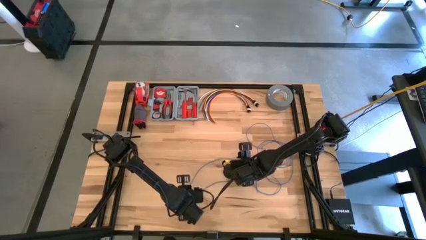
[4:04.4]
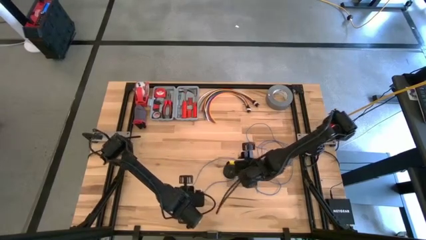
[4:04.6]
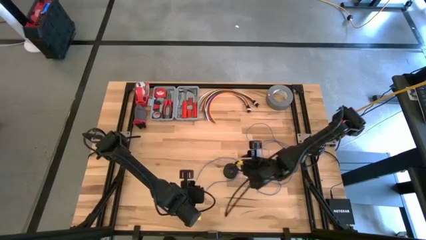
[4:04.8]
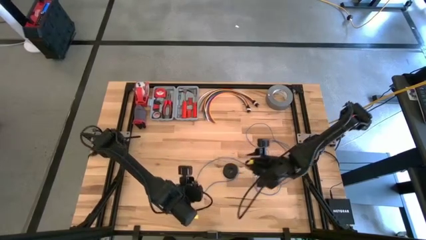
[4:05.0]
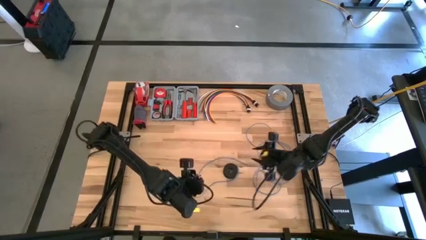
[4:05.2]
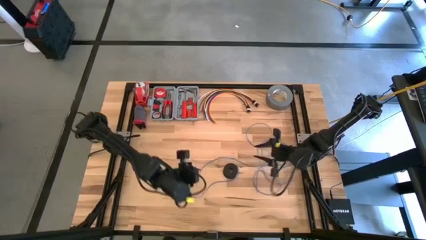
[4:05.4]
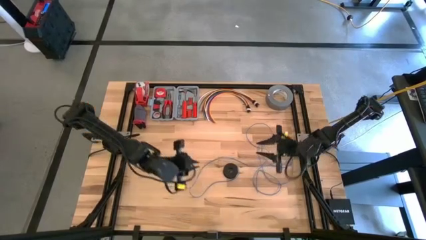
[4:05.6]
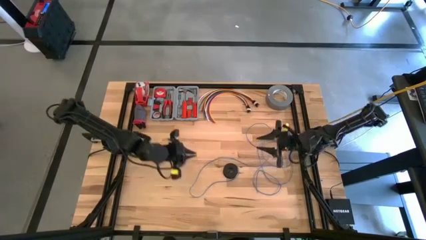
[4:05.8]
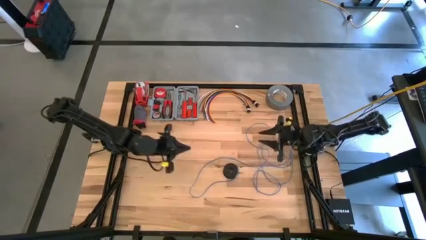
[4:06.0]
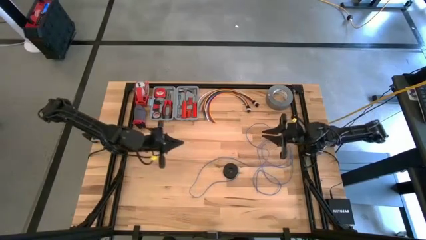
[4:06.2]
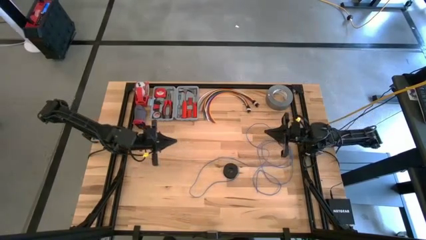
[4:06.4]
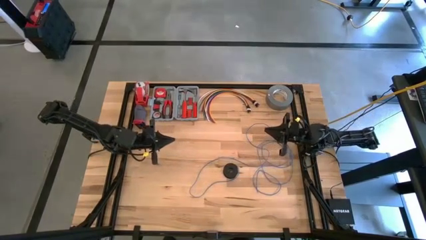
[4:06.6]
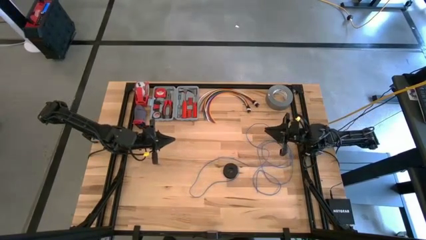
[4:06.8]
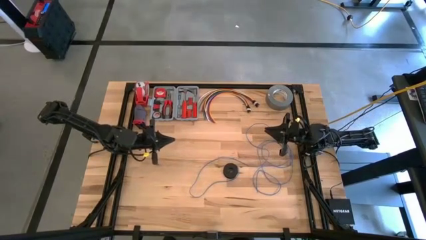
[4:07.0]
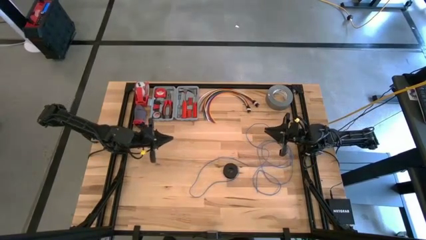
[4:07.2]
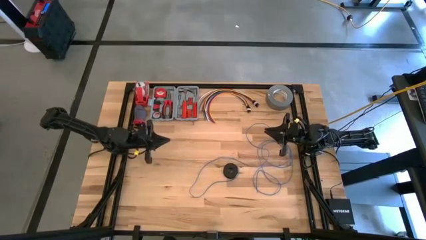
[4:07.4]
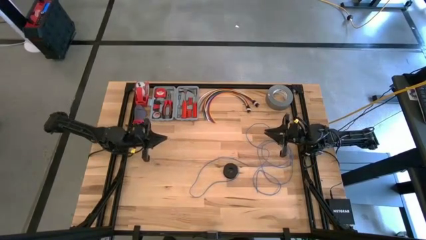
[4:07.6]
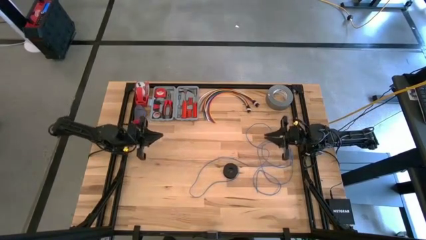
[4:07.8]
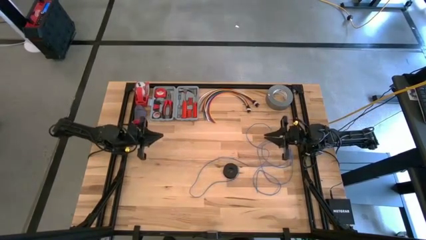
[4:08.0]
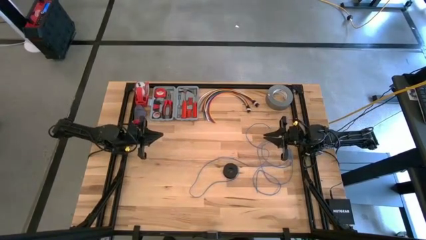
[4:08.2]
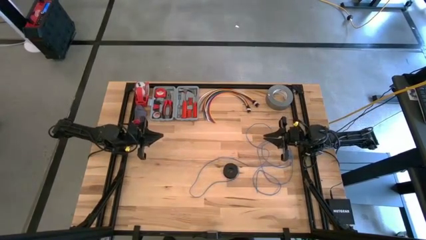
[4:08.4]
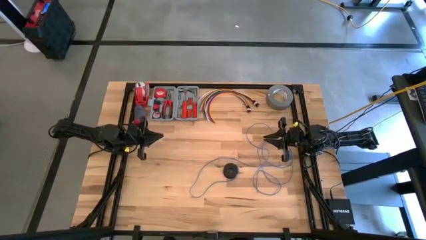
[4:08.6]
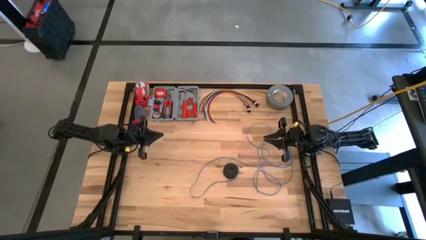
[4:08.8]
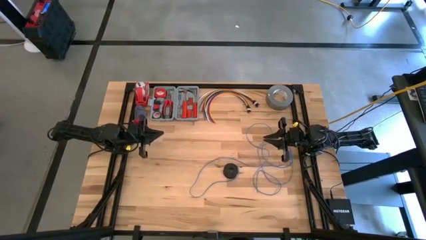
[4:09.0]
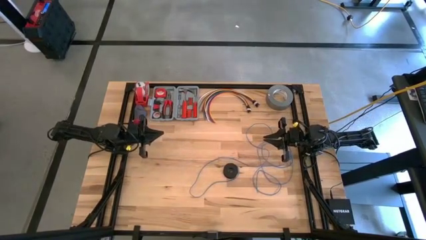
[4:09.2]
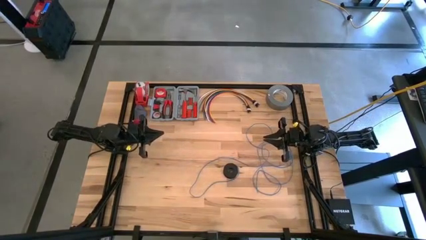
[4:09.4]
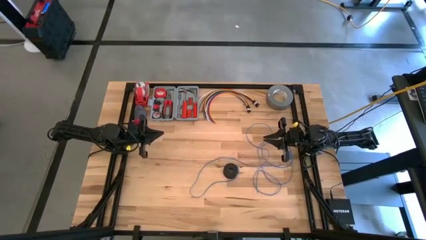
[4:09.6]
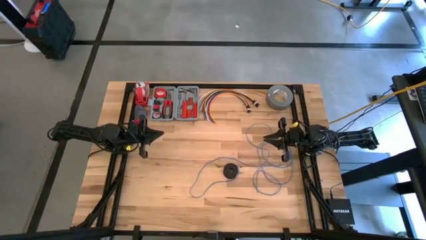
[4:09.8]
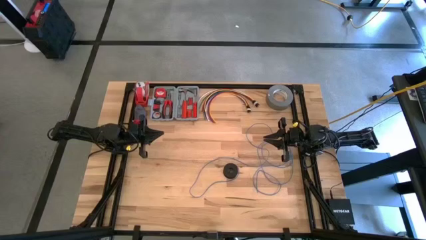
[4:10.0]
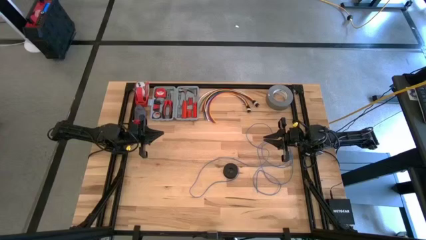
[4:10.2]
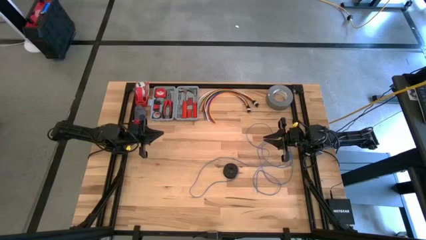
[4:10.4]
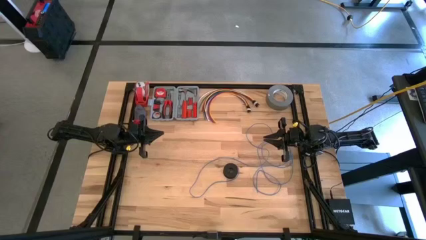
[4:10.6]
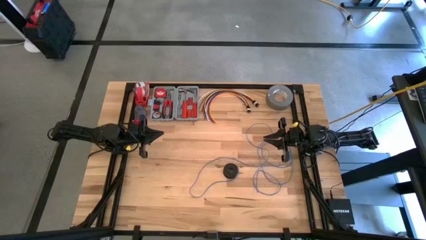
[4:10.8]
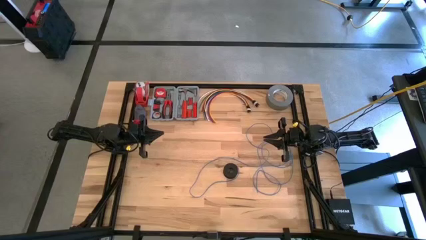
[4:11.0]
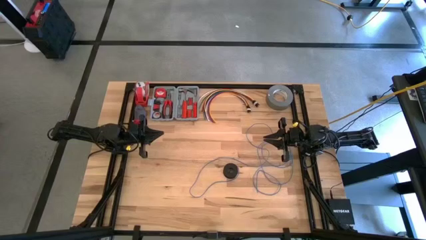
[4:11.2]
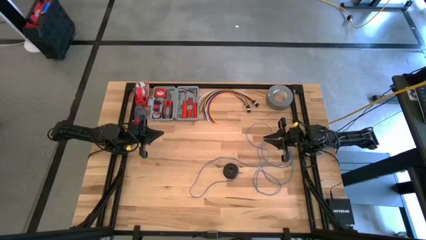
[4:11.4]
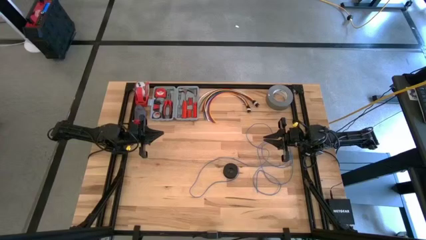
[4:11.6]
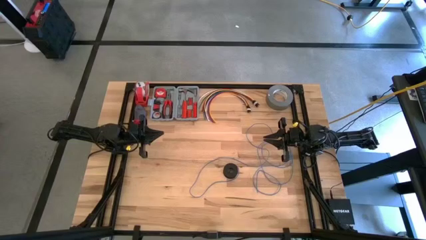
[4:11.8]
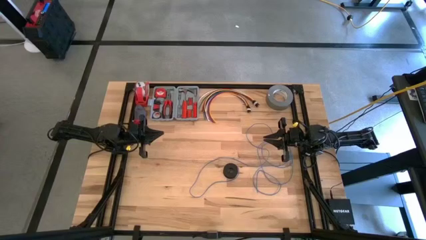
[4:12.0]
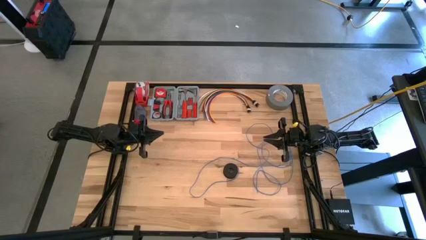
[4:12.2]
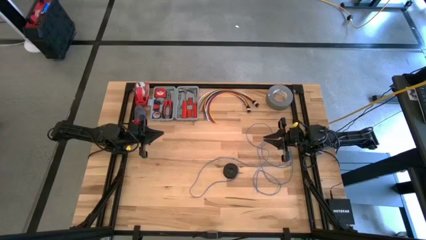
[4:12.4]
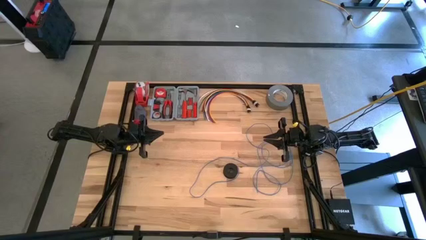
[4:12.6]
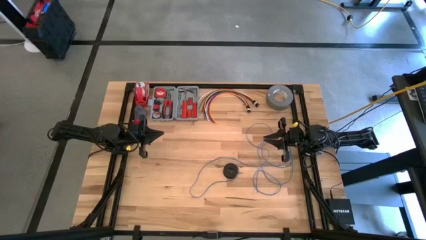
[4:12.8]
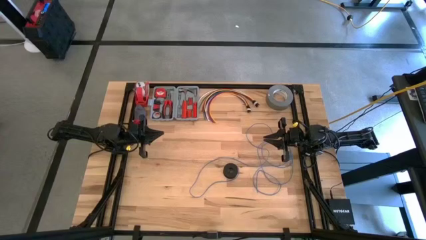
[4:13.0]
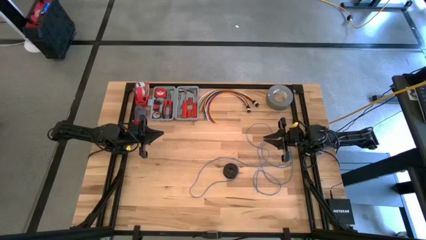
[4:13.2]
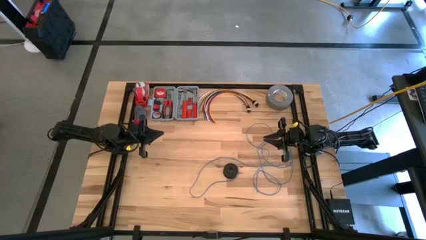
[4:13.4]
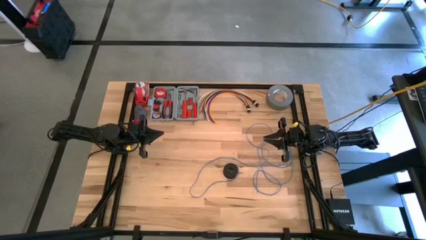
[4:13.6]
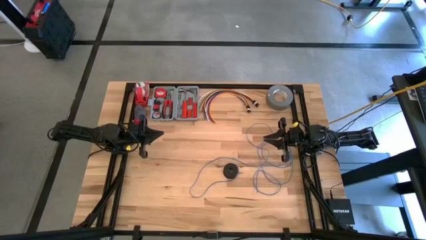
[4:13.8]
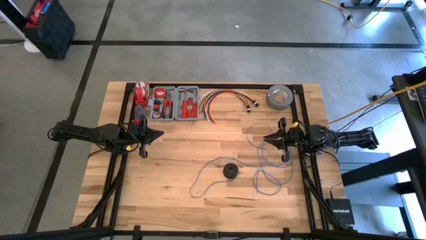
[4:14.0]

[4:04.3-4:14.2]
Task: Coil cords
Return to Home Position

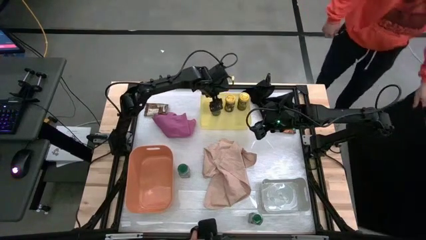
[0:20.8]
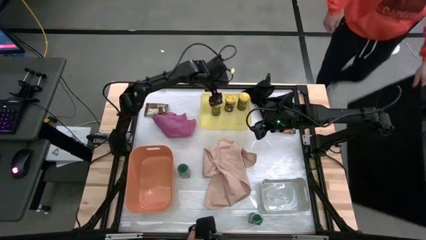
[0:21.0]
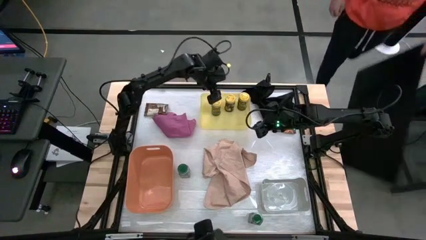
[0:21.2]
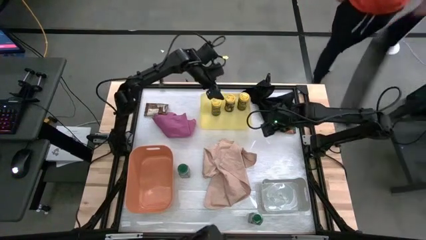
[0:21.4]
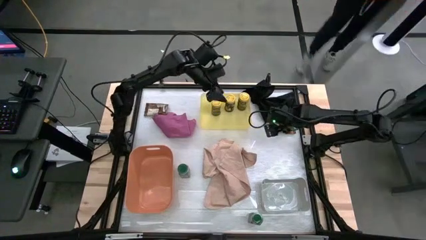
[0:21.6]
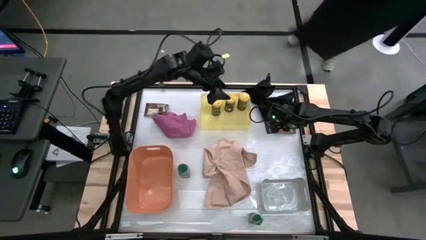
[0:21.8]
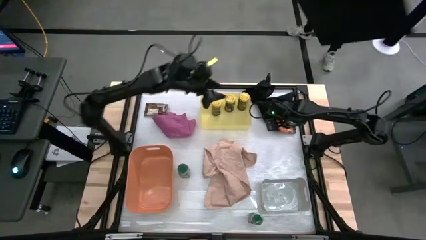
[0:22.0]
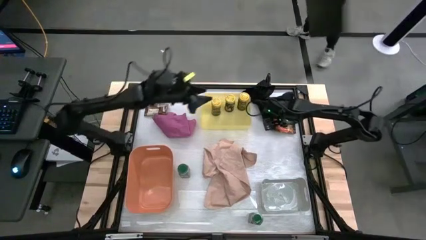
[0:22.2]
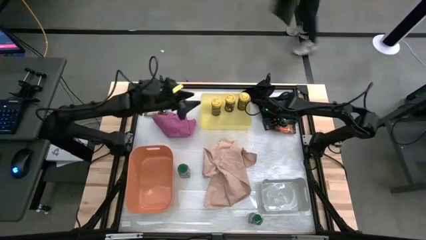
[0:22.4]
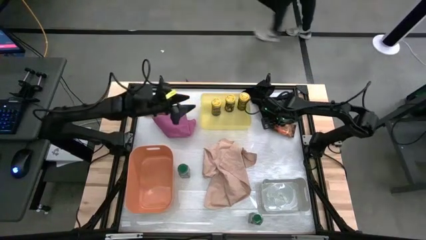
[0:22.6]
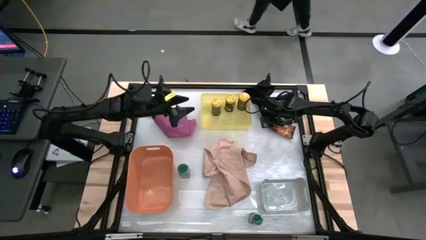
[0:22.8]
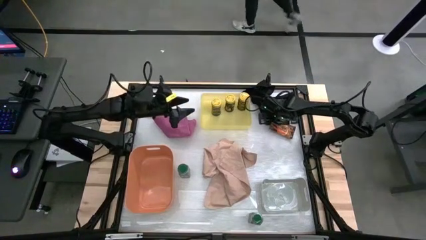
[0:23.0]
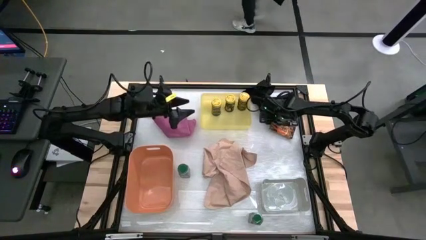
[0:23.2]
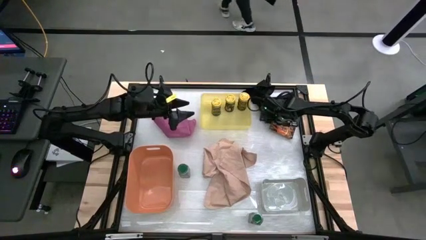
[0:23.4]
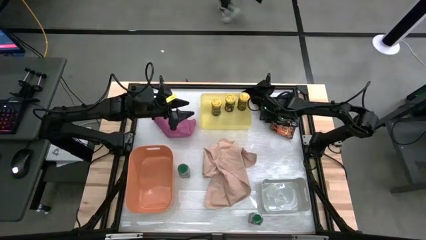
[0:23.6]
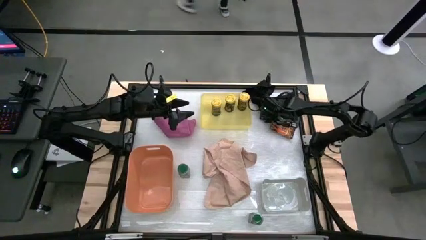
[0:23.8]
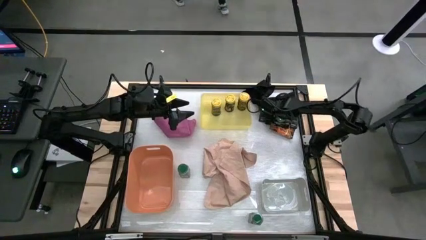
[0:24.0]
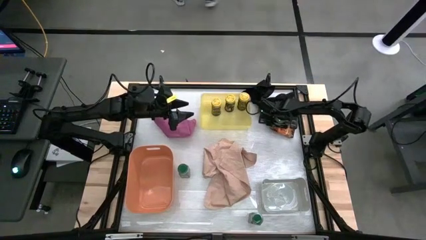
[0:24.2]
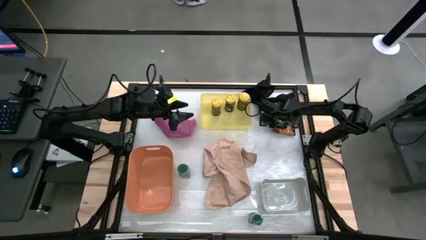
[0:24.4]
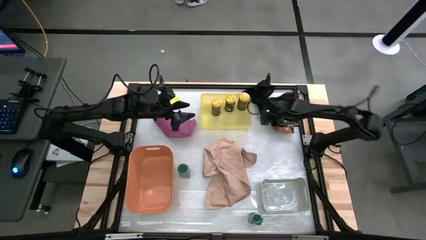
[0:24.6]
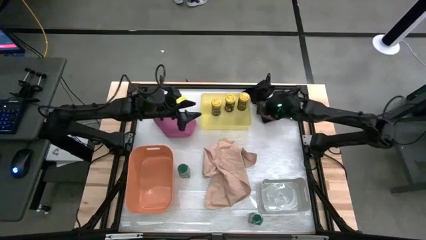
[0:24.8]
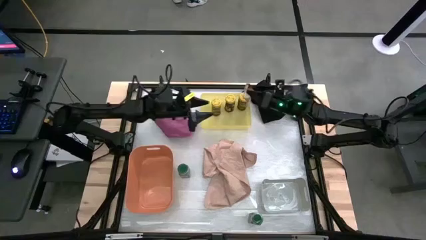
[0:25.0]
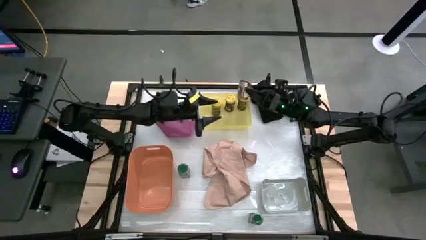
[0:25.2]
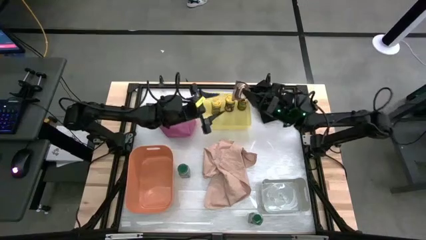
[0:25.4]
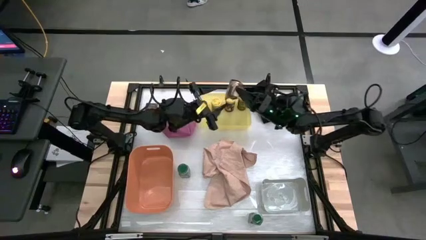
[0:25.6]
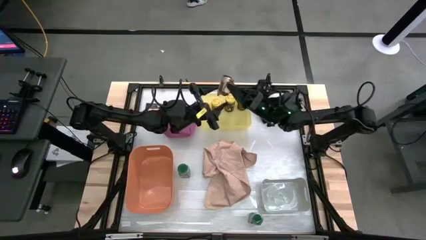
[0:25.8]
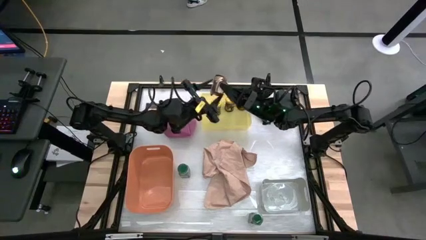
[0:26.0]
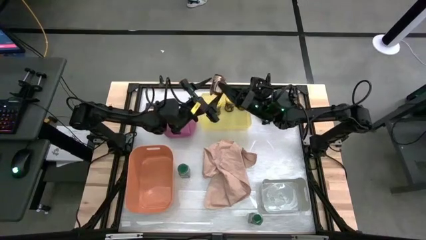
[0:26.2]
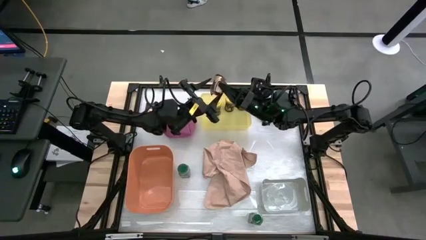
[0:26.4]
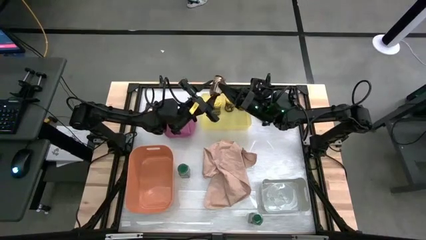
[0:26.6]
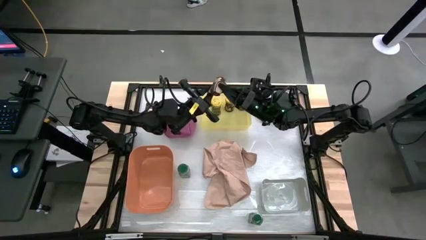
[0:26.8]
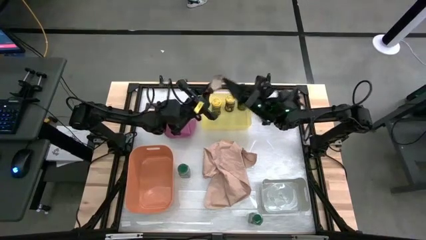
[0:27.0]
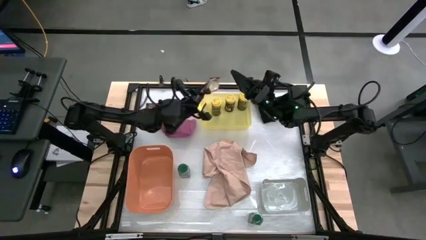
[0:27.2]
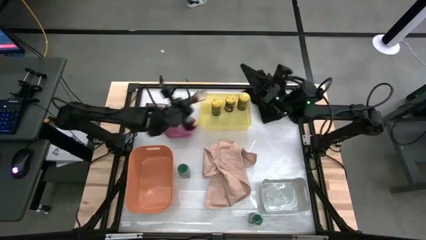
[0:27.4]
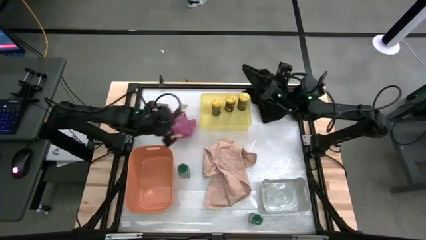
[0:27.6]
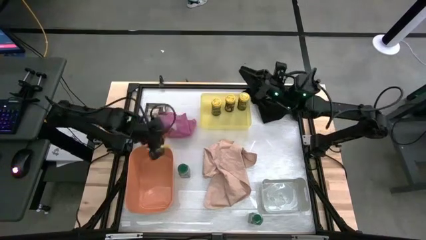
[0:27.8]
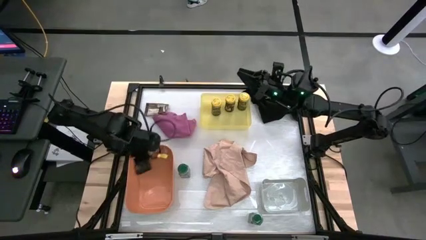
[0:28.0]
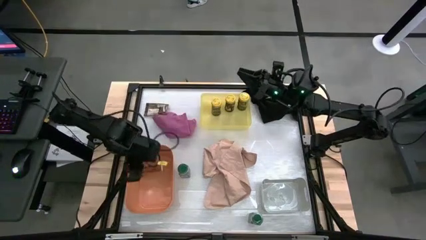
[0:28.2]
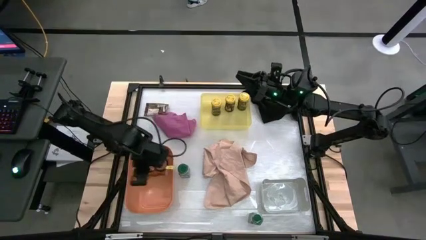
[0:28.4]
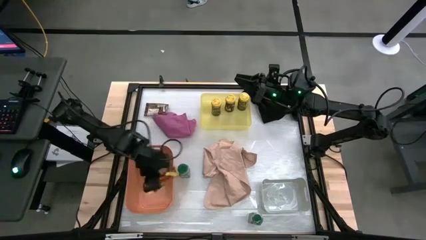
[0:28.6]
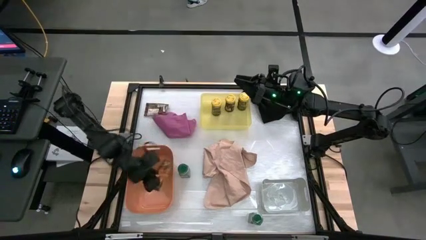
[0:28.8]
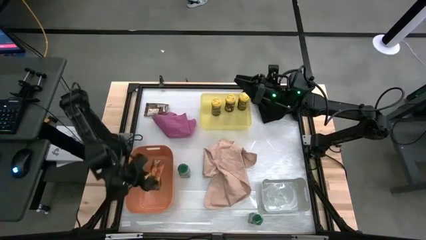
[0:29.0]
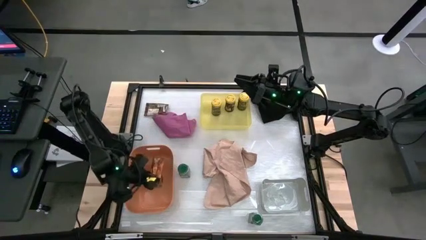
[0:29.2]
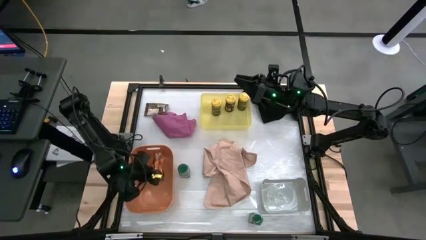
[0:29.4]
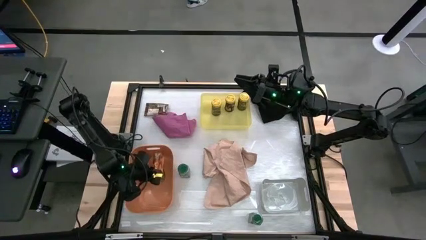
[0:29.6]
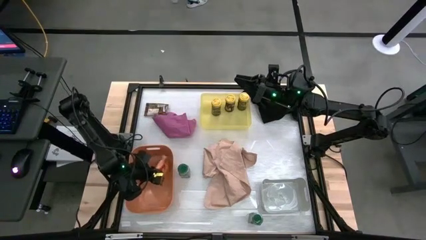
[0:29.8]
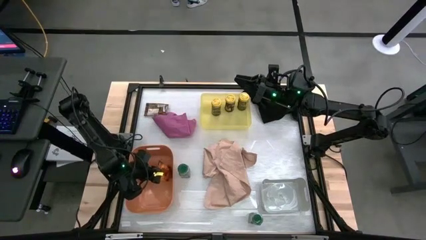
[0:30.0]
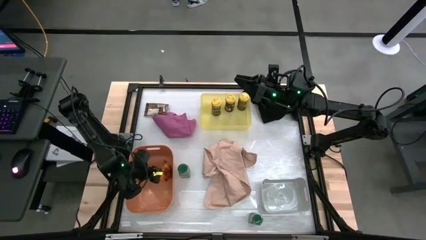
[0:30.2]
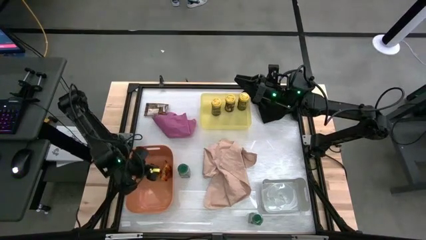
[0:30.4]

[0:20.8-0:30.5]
Task: Sort spices by type
Put the right orange spice pack into the orange bin
